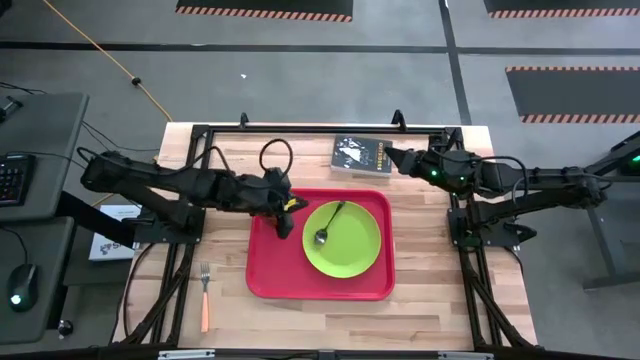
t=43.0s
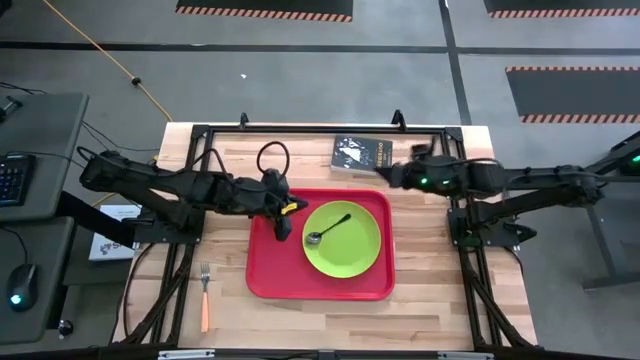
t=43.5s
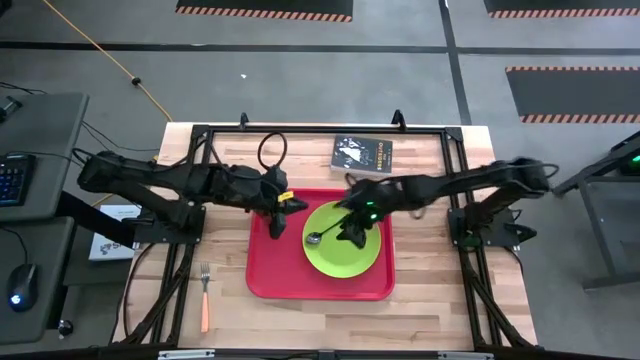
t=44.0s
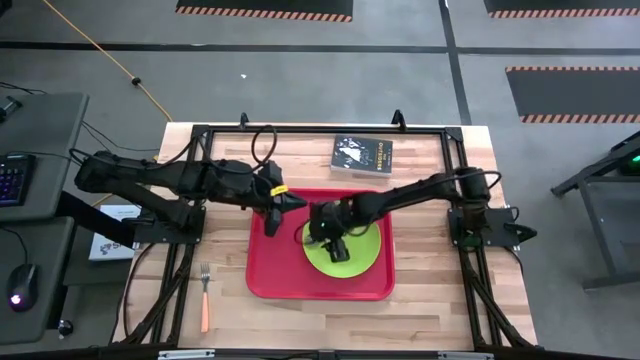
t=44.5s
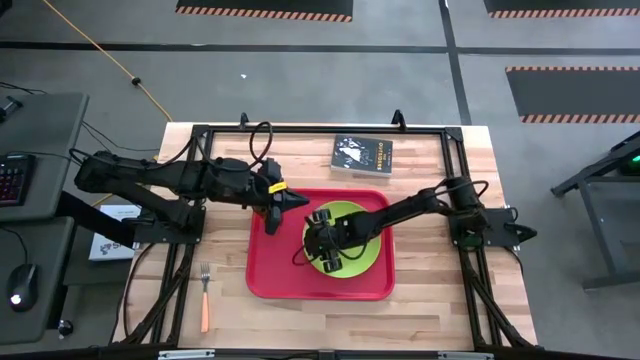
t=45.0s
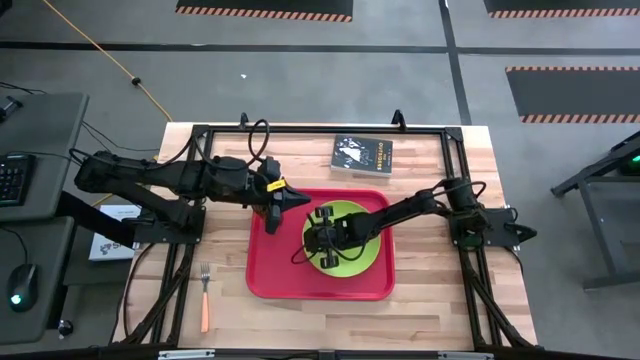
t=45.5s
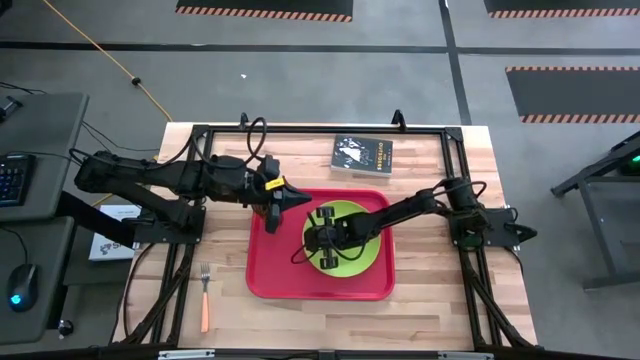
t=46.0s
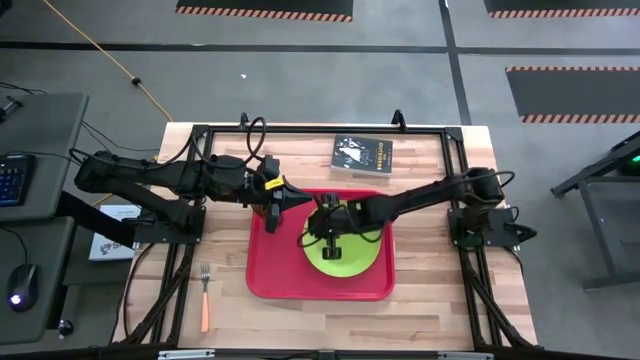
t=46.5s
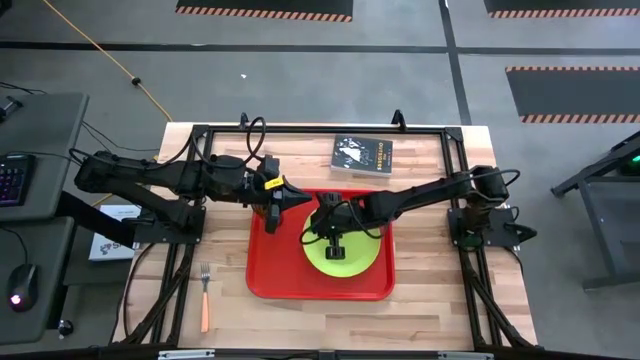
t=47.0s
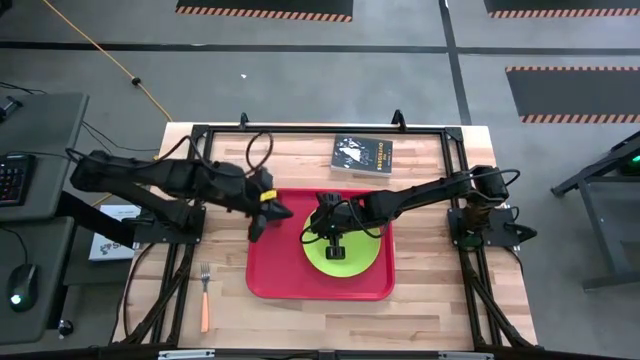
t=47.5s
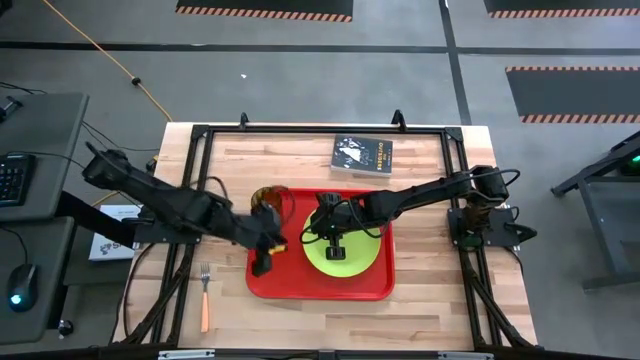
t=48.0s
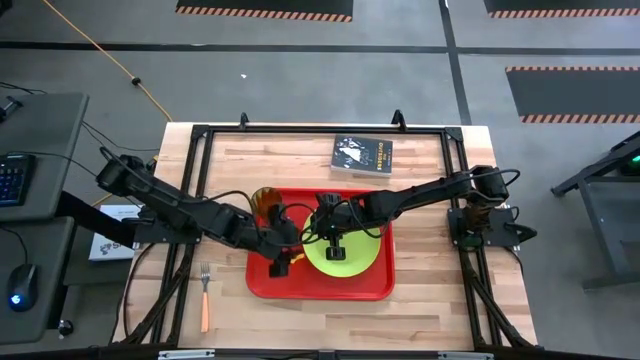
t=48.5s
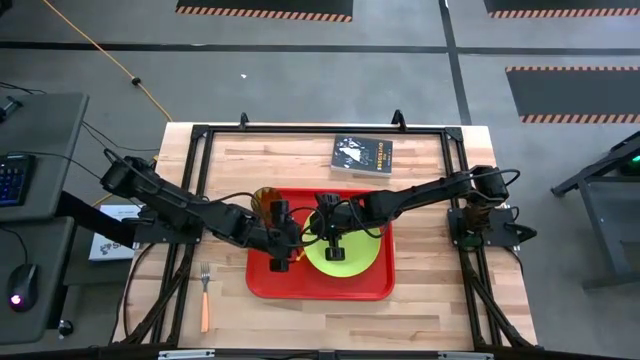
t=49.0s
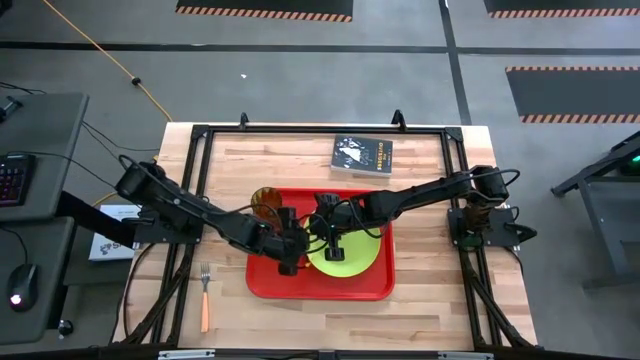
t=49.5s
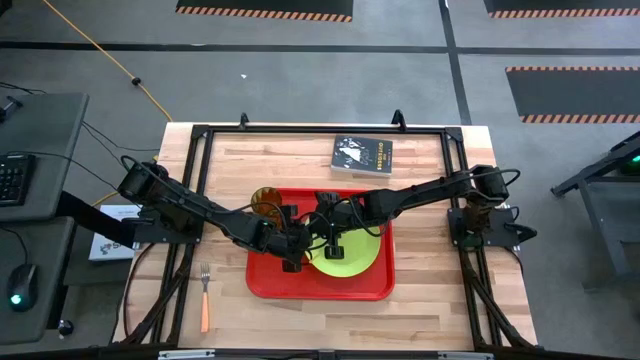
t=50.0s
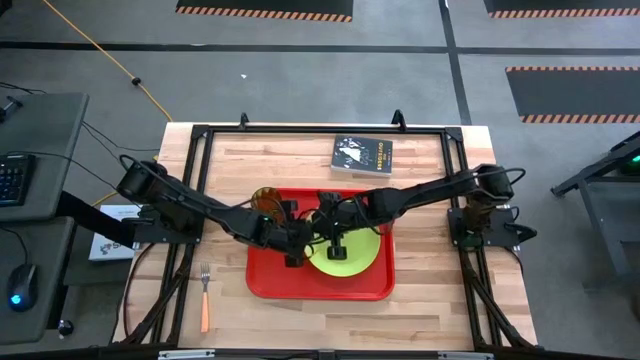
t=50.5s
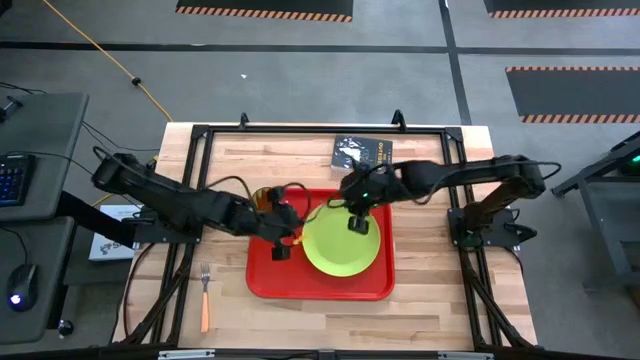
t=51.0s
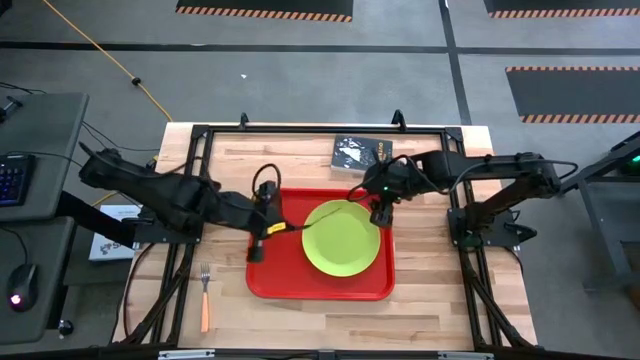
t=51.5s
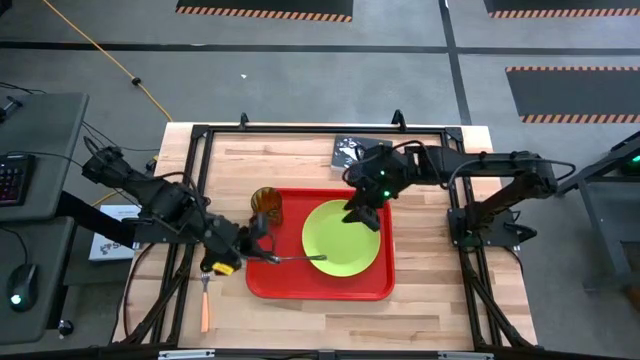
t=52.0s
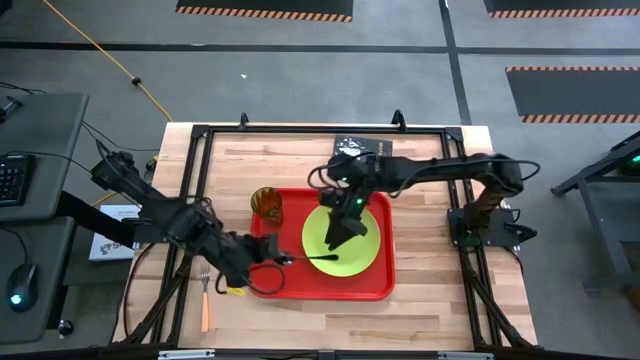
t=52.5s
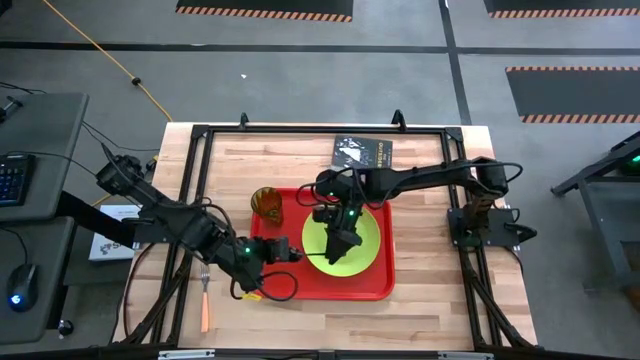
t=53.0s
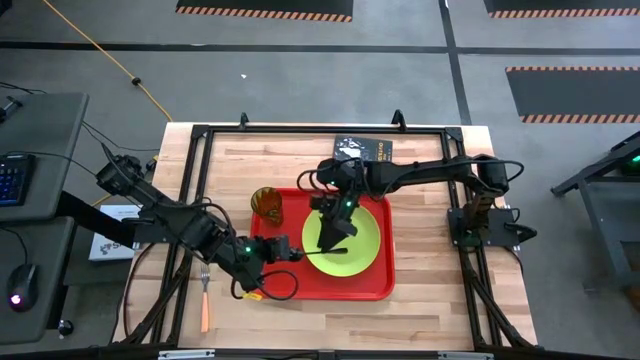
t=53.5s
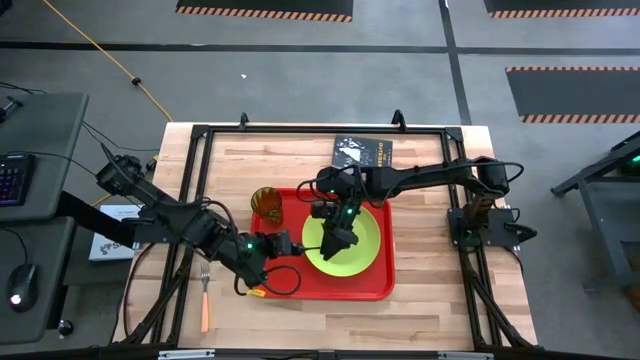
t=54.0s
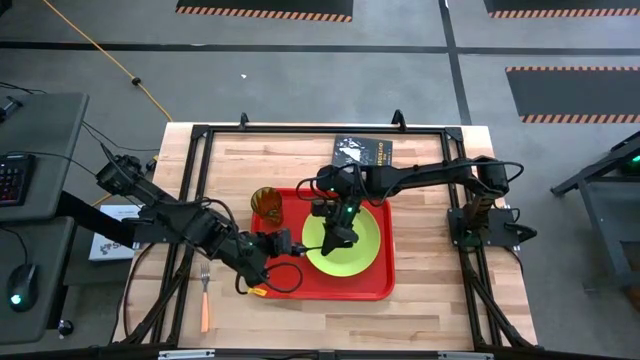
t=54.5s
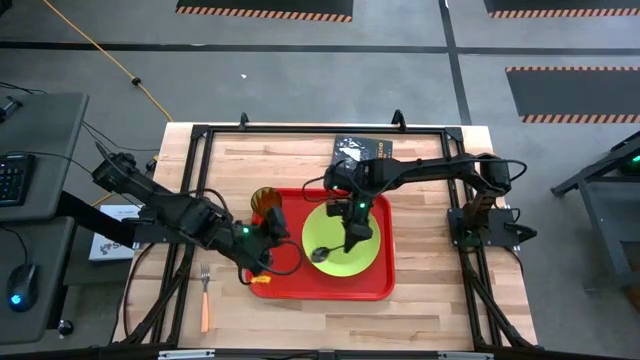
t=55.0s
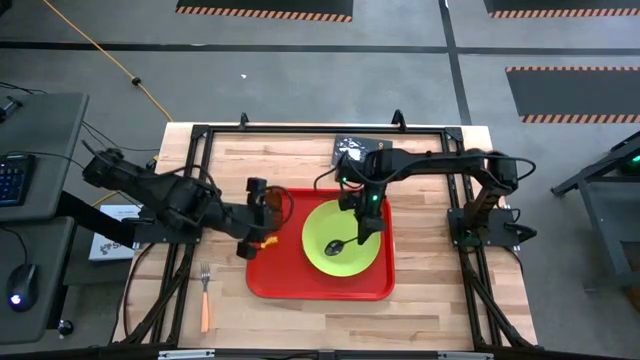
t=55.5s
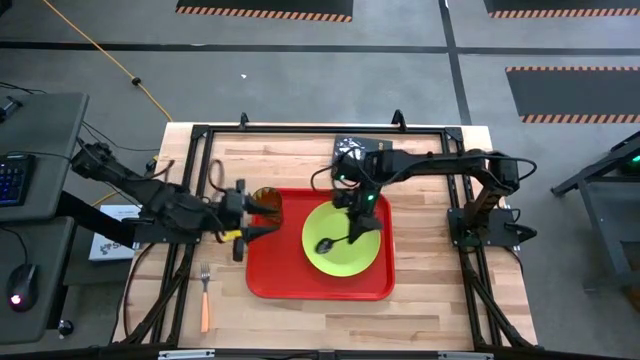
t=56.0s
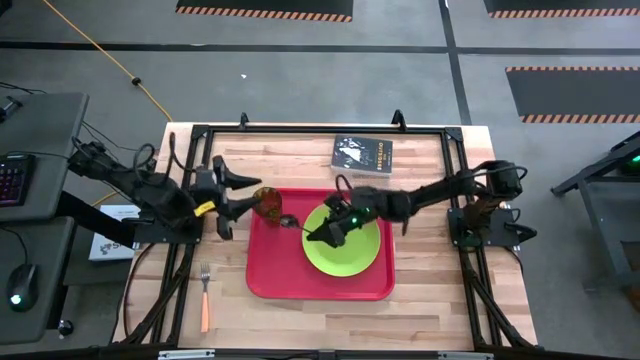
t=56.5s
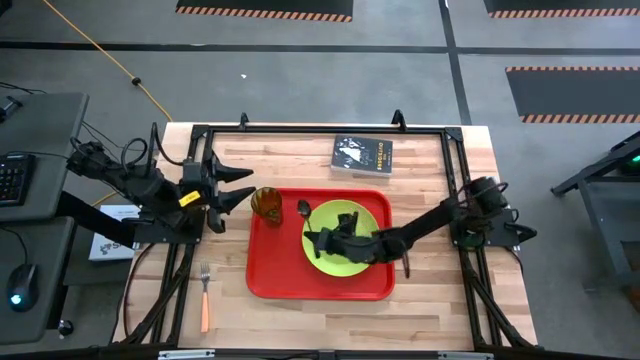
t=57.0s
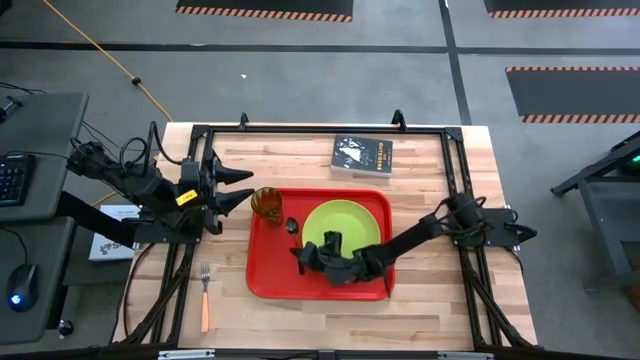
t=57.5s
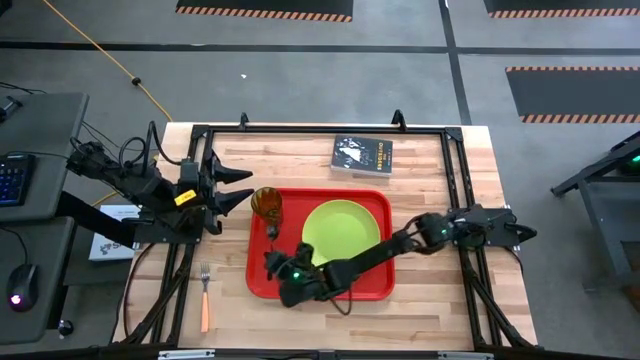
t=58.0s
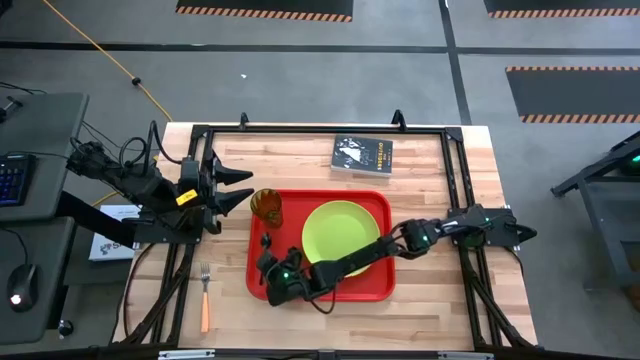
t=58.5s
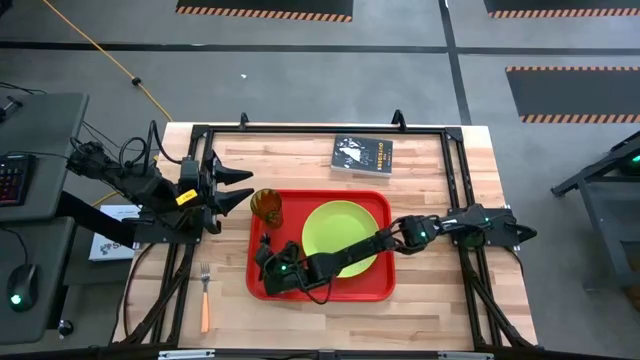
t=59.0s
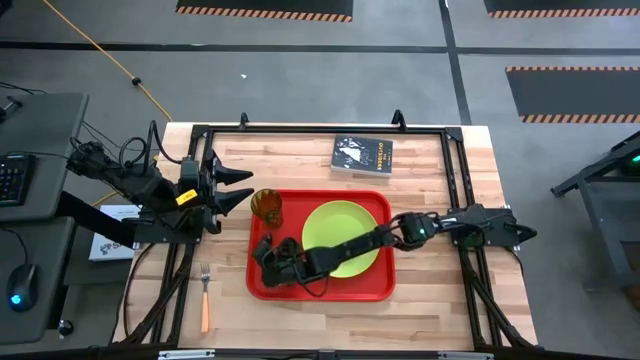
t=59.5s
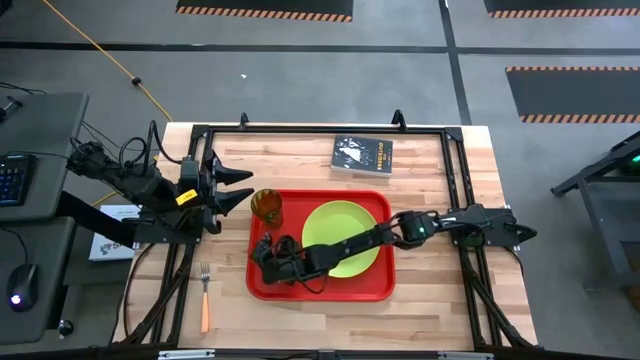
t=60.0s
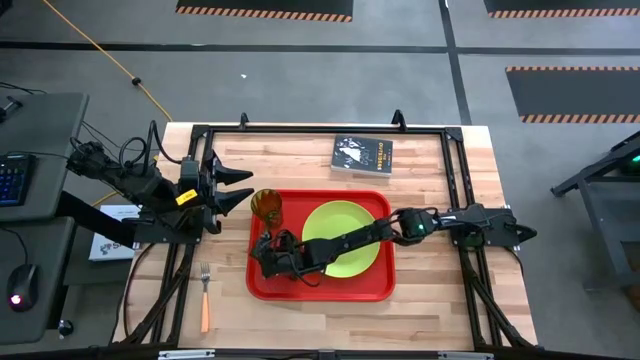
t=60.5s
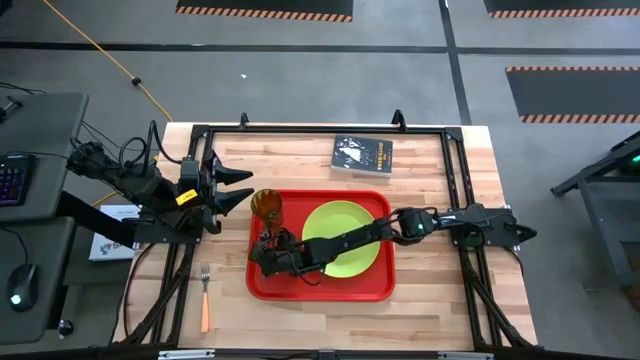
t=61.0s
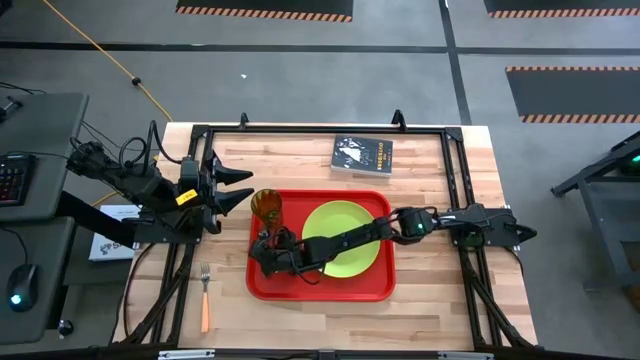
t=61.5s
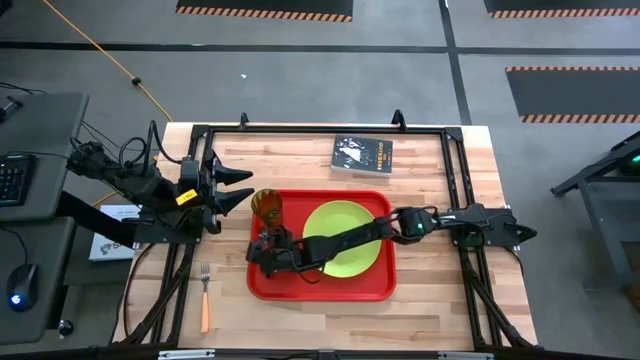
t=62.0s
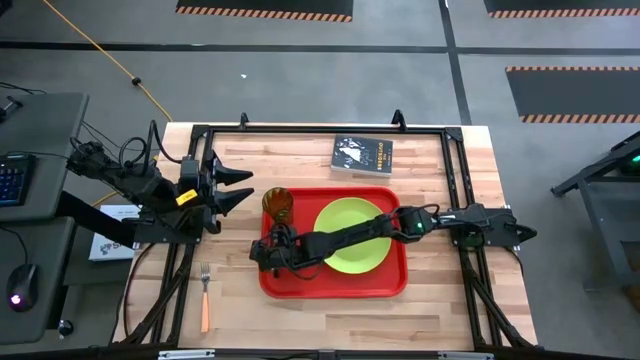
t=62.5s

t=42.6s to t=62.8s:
Task: Pick and place plate/cup/fork/spoon on tray
Put the black spoon on the red tray to the bottom of the green cup

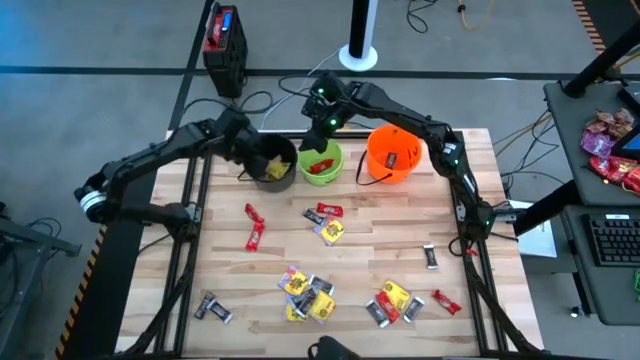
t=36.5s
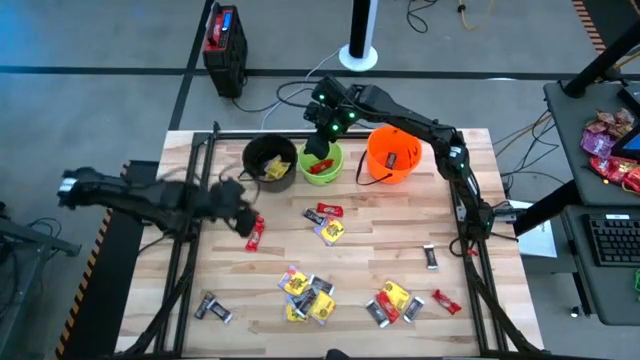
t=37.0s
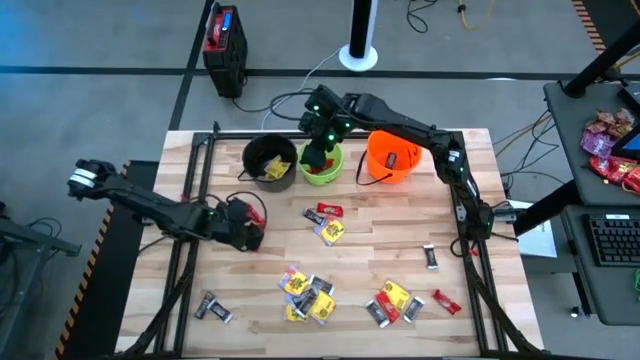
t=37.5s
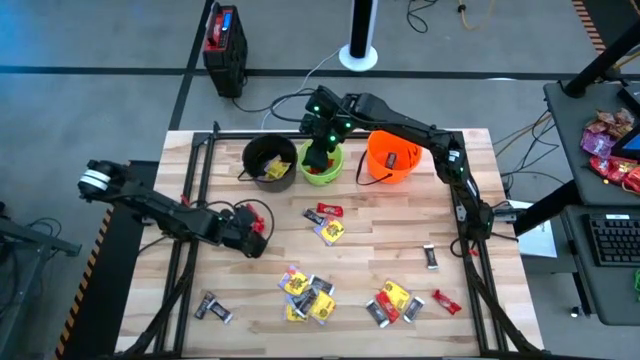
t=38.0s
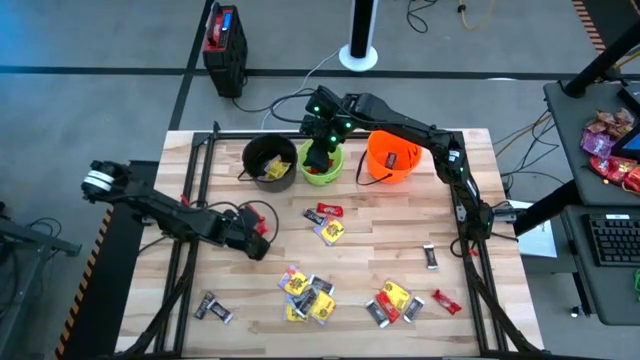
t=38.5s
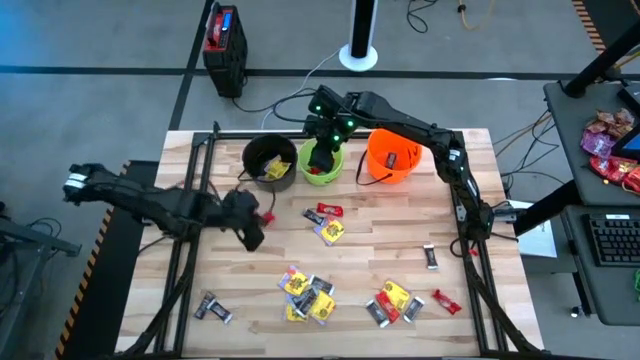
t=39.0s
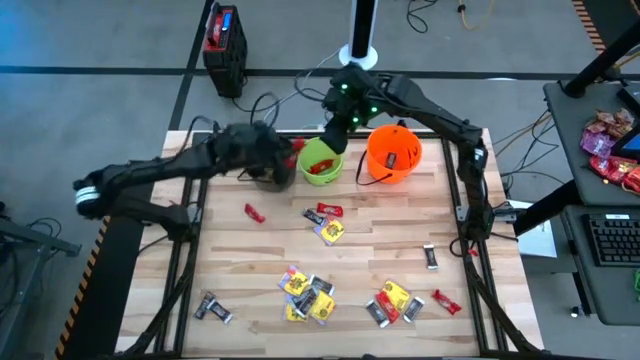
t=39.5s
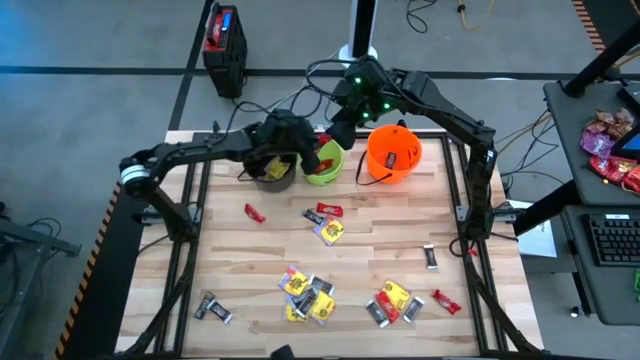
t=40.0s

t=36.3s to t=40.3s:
Task: Sort candy by brand, put in halloween buckets
Put the red chocolate bar into the green bucket
